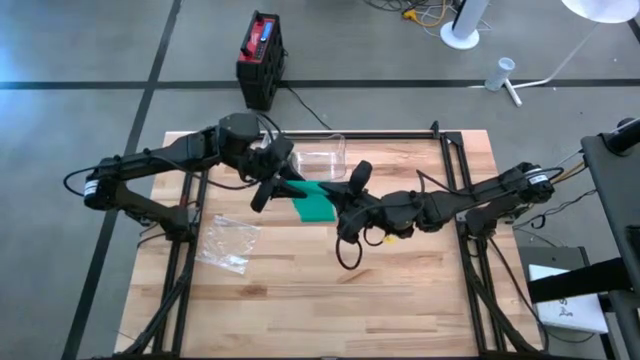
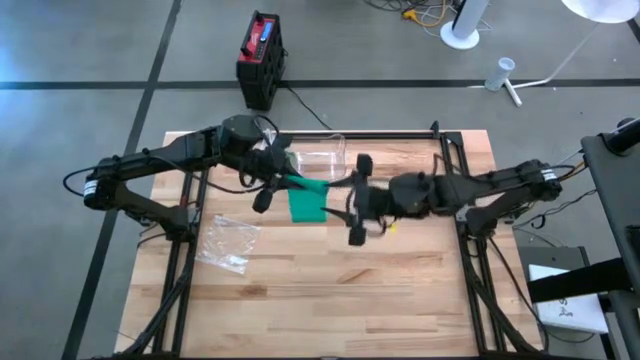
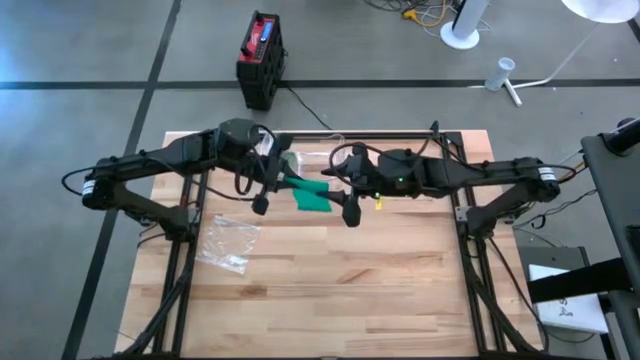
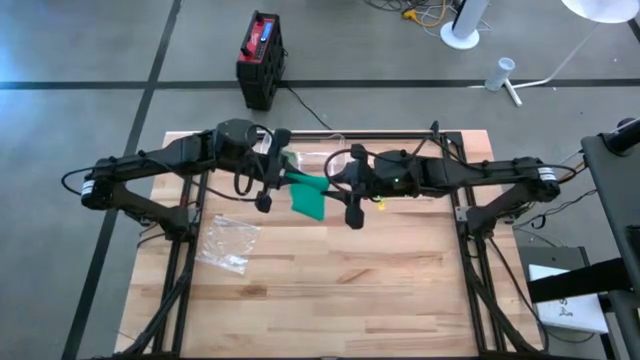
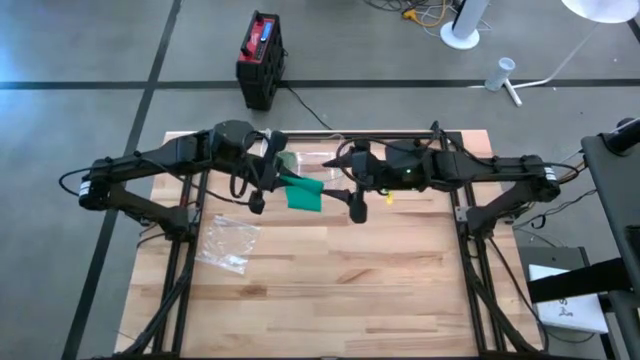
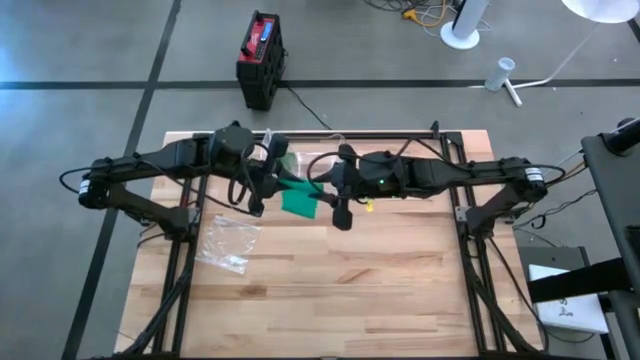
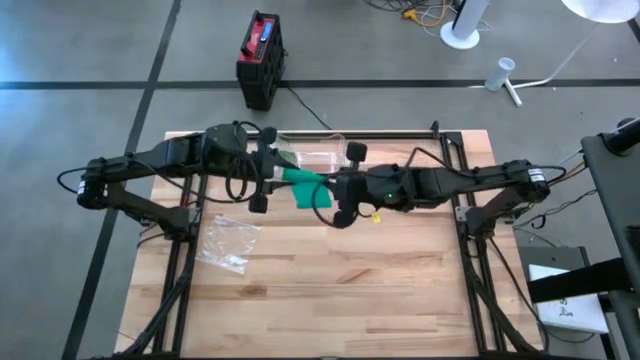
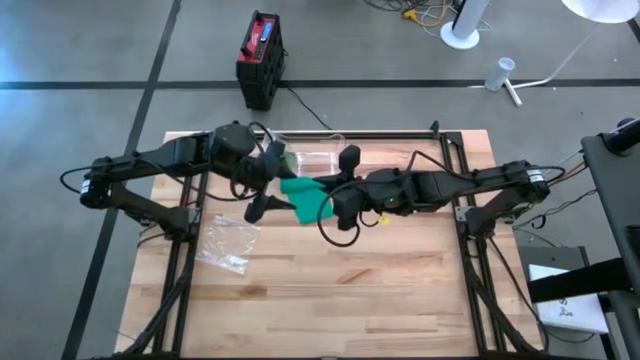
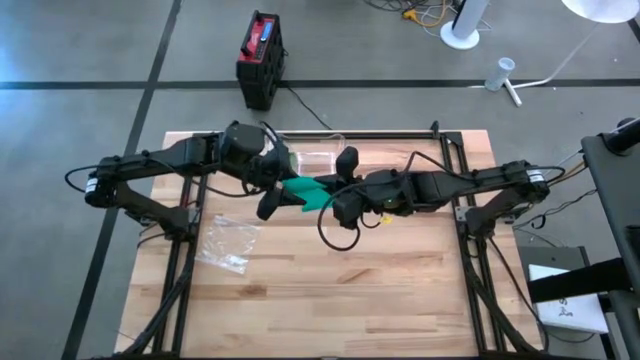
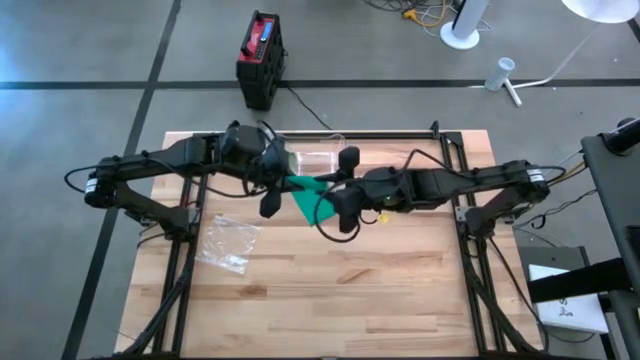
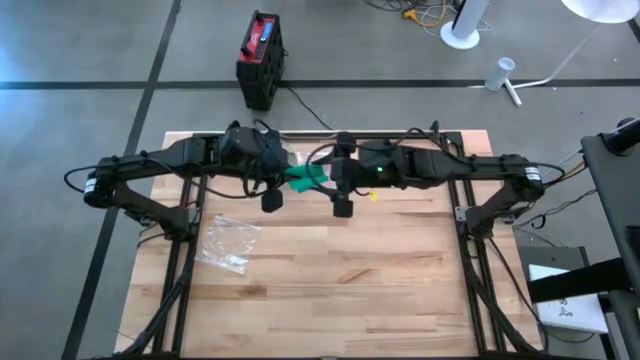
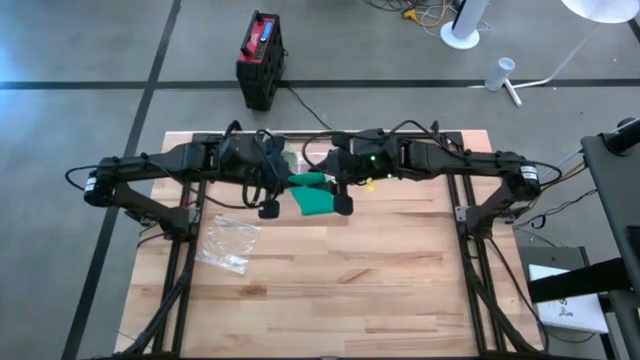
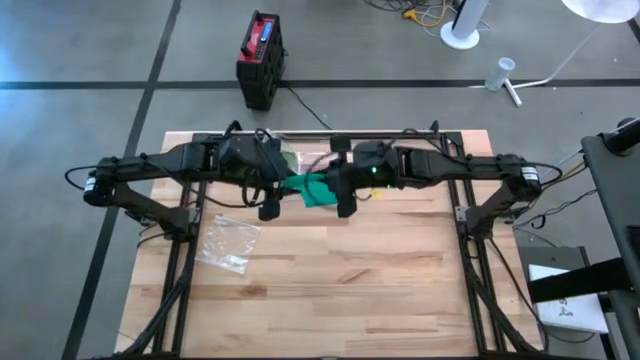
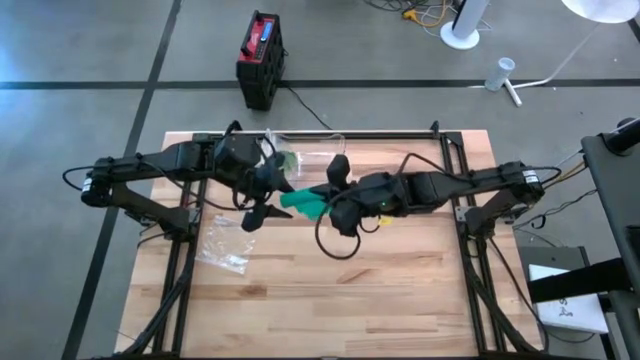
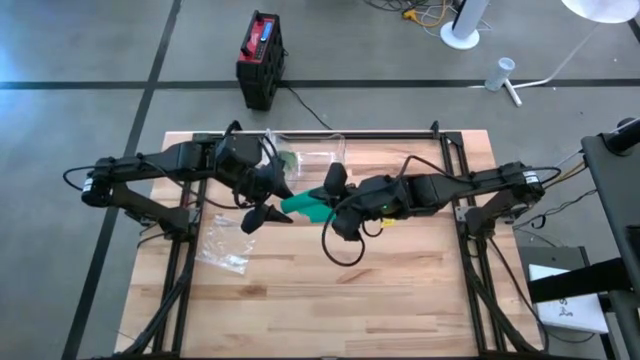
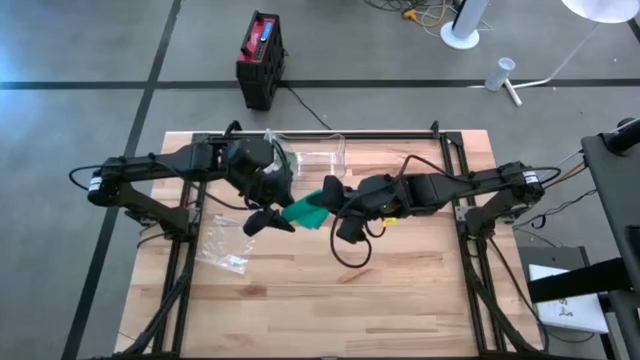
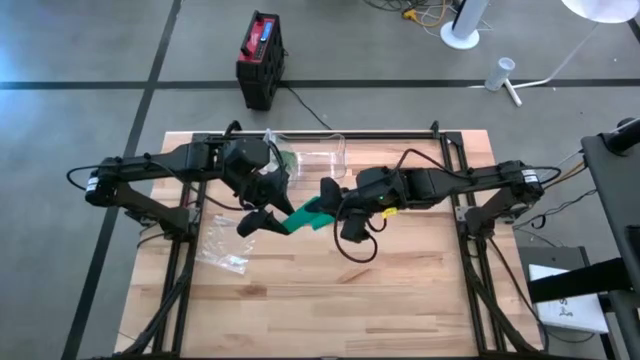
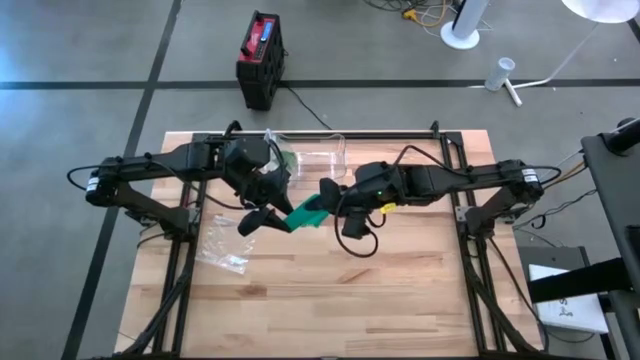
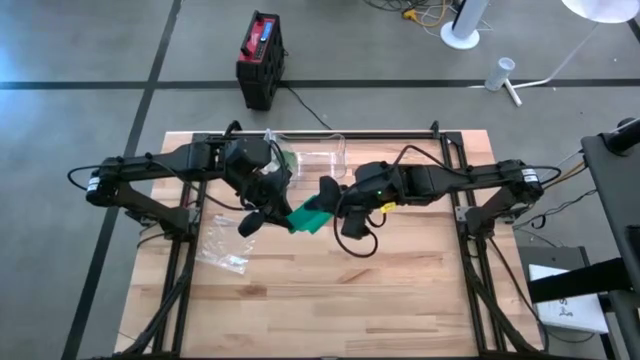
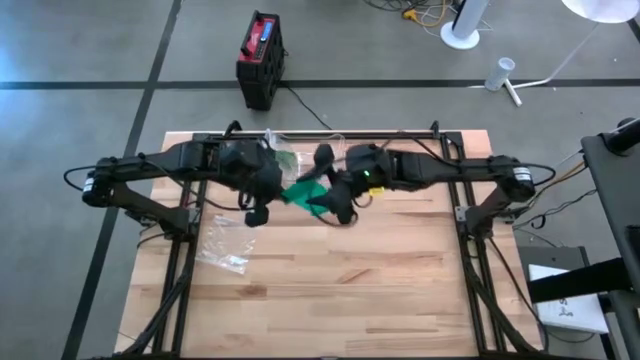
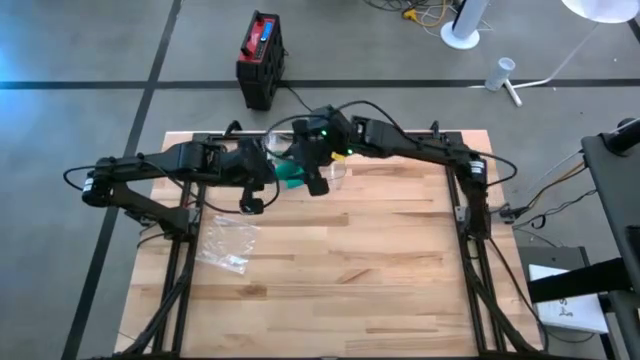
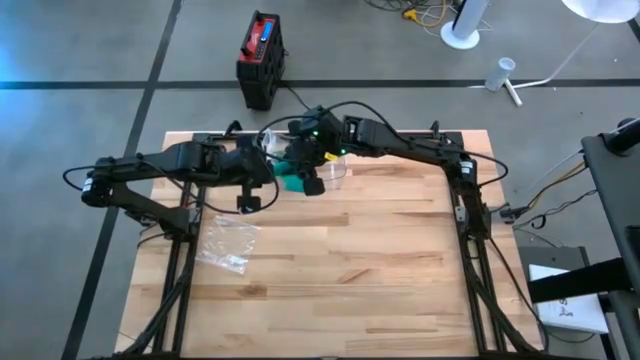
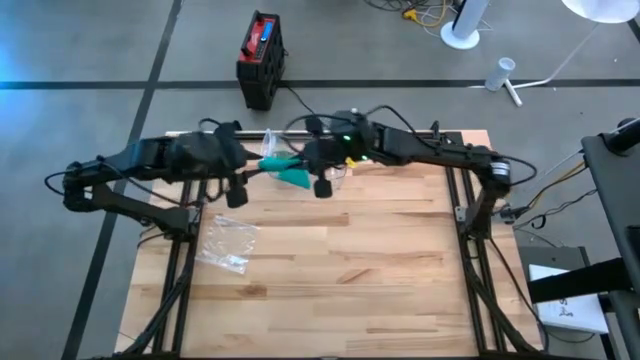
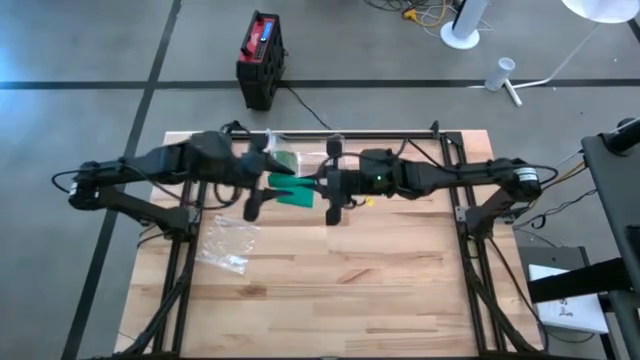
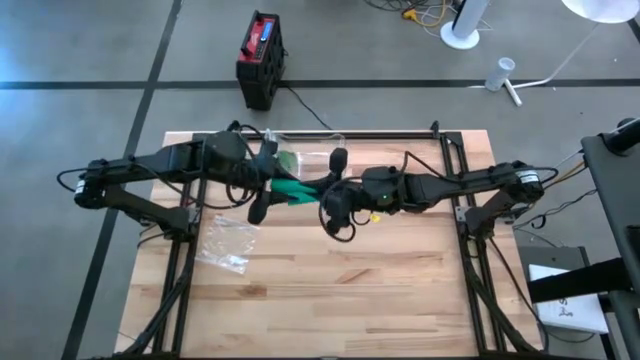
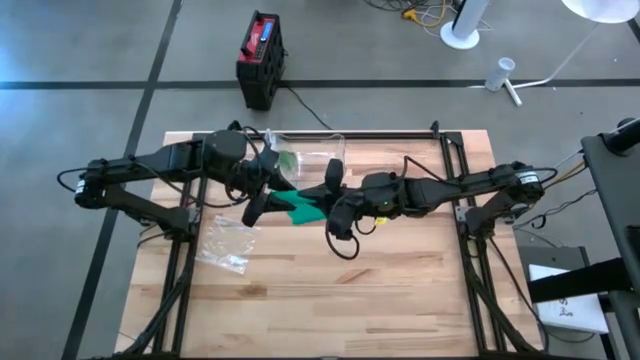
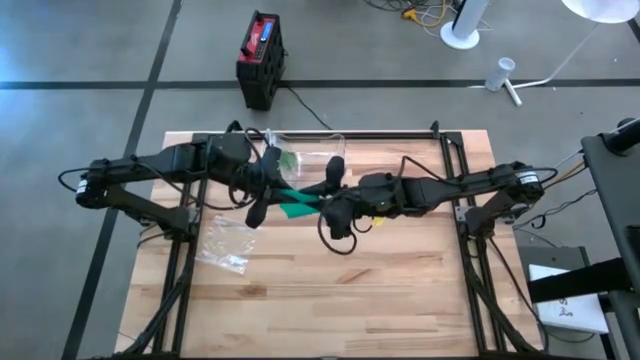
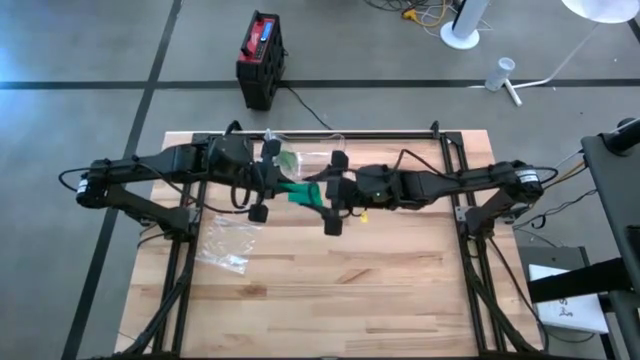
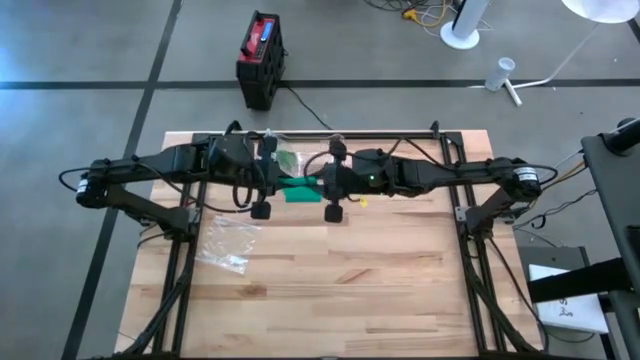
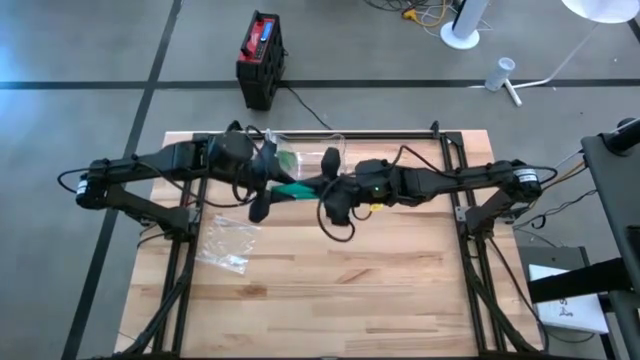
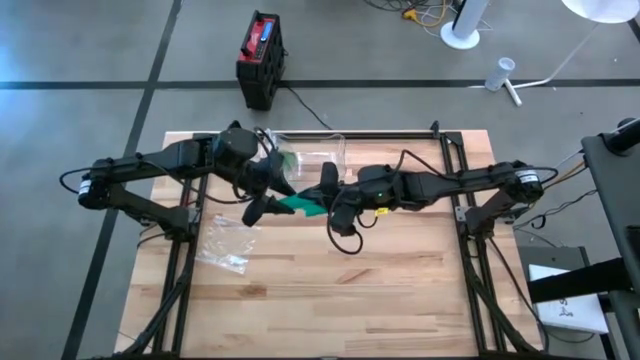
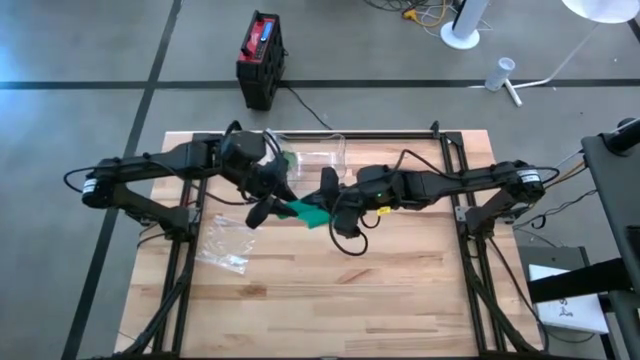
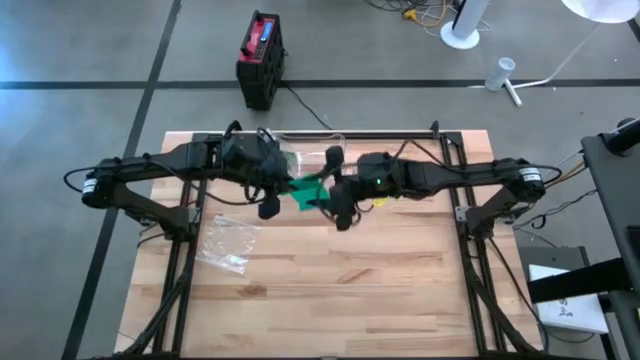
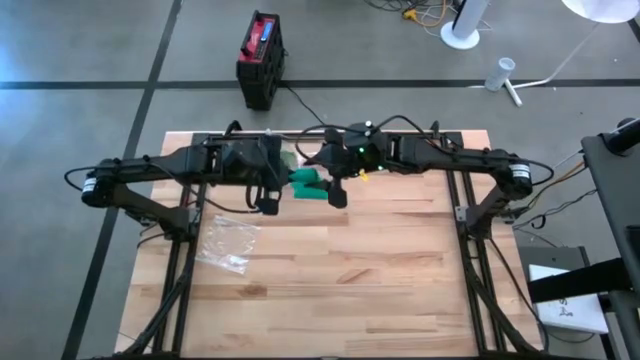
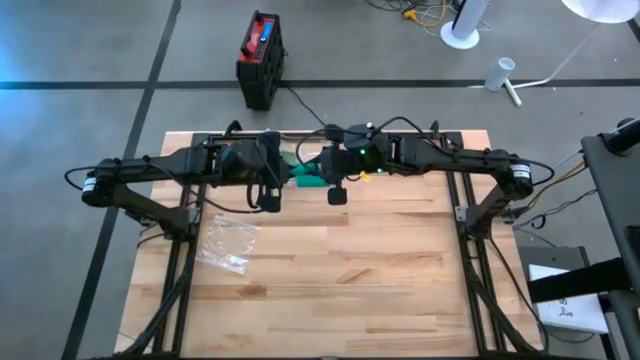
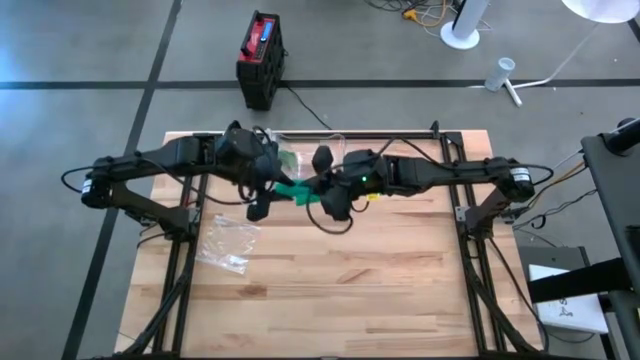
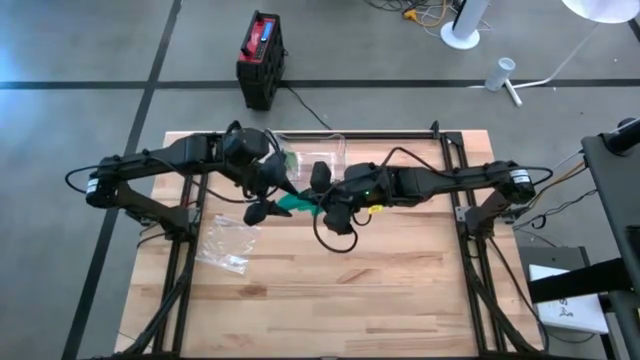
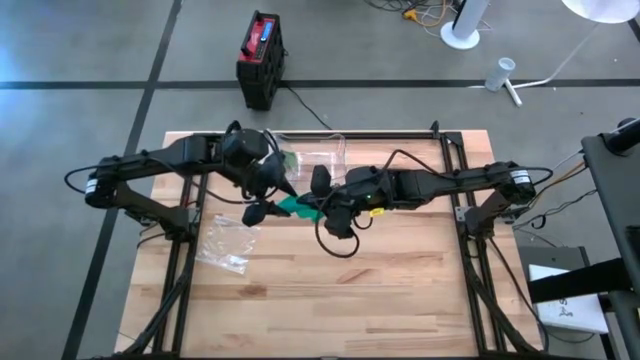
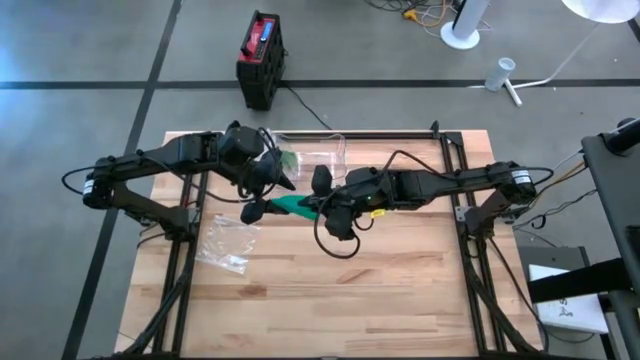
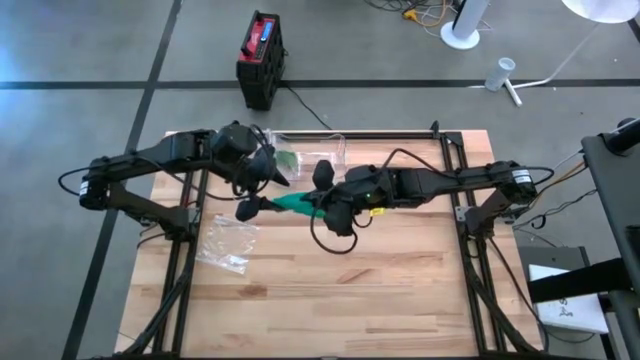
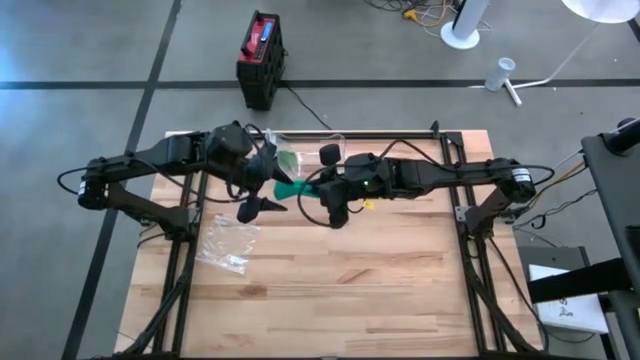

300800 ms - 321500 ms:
Task: Roll bandage
Roll the blue bandage
